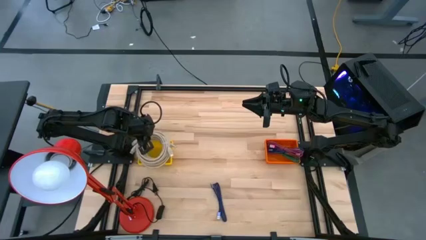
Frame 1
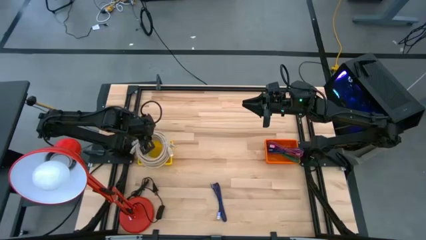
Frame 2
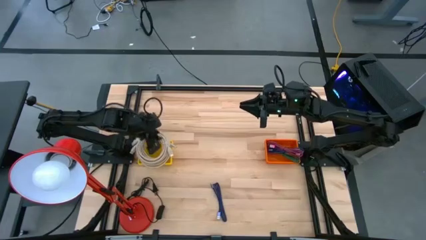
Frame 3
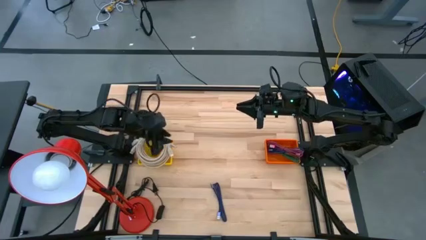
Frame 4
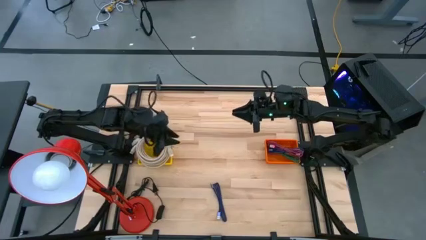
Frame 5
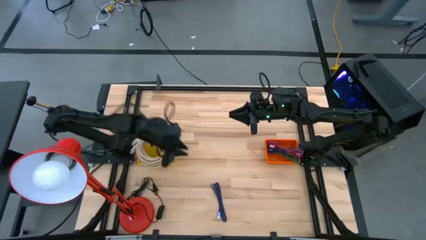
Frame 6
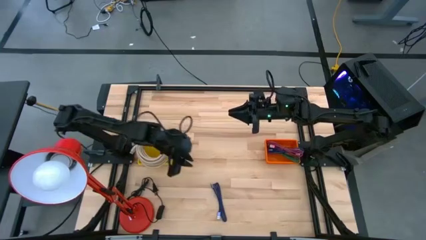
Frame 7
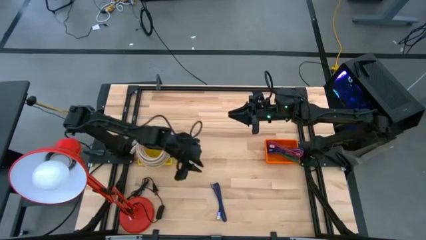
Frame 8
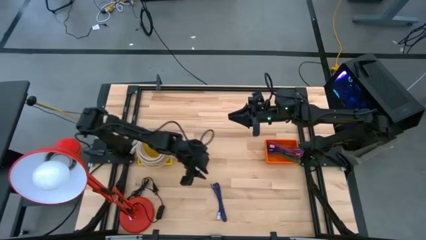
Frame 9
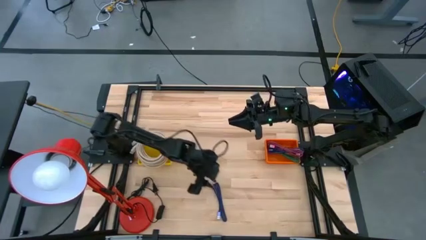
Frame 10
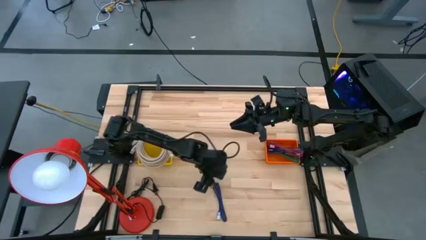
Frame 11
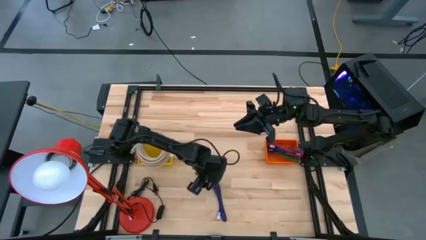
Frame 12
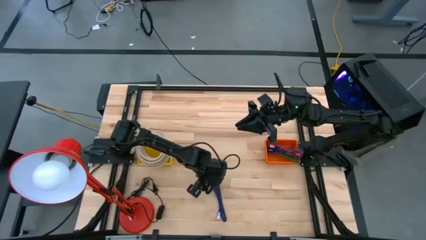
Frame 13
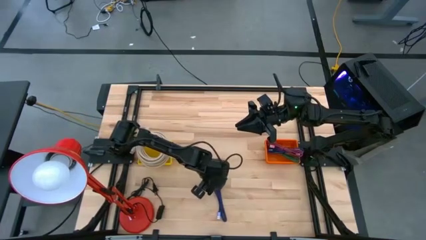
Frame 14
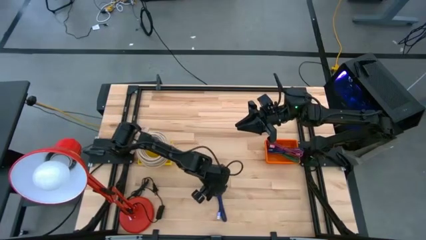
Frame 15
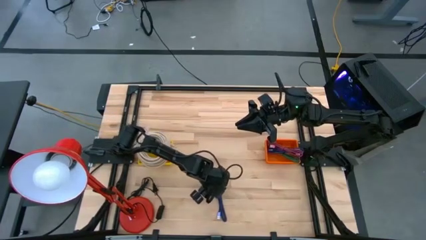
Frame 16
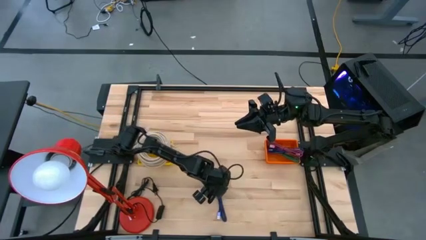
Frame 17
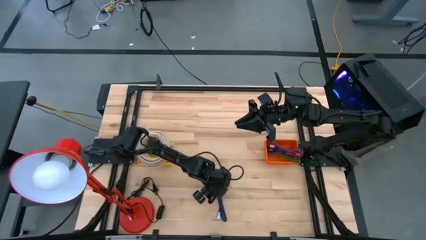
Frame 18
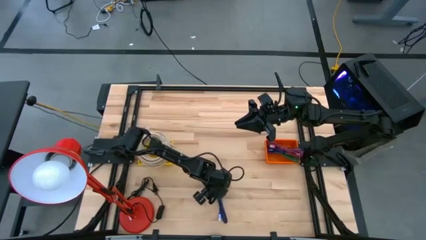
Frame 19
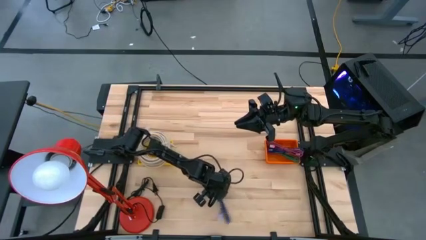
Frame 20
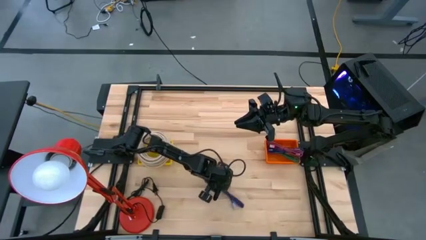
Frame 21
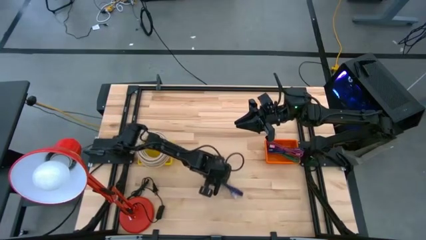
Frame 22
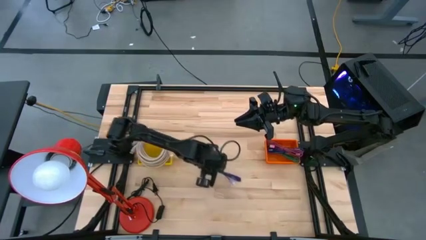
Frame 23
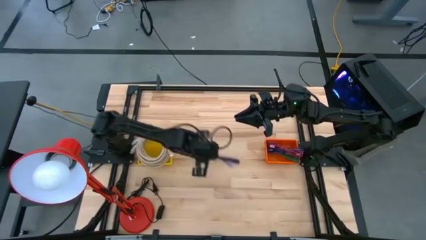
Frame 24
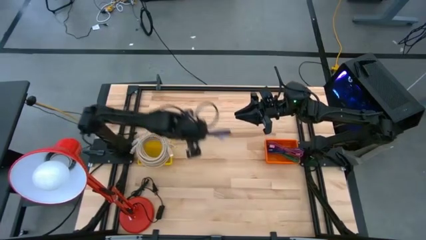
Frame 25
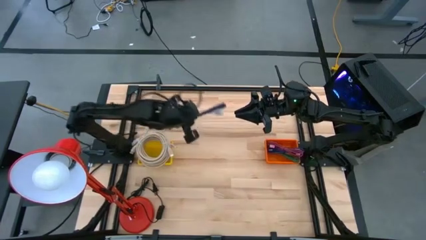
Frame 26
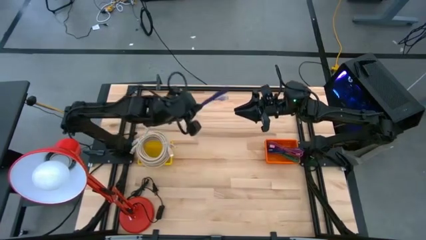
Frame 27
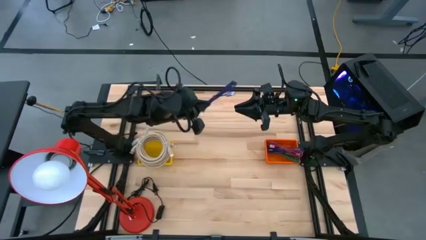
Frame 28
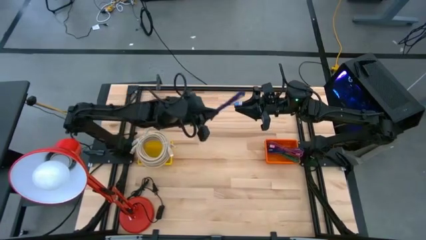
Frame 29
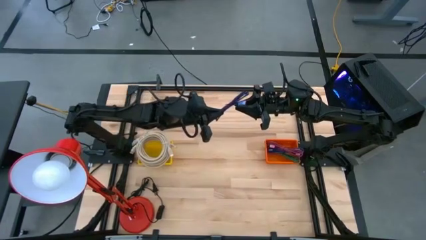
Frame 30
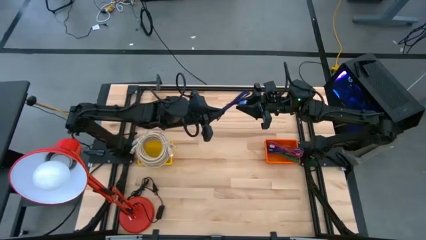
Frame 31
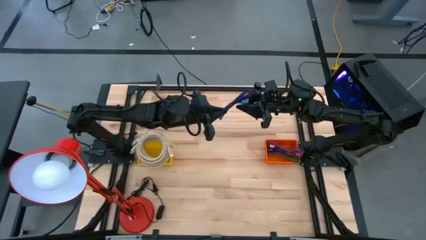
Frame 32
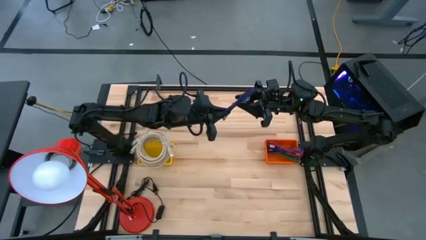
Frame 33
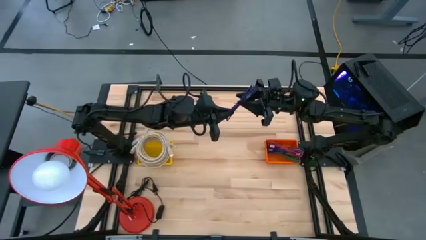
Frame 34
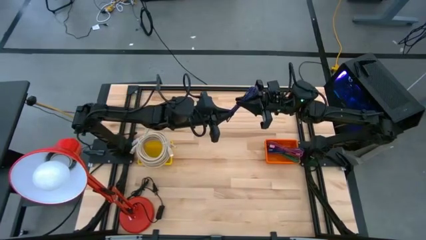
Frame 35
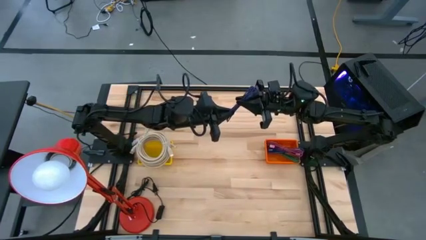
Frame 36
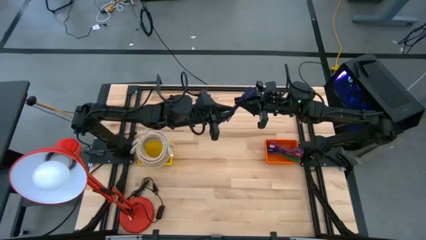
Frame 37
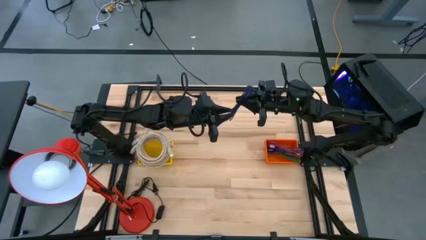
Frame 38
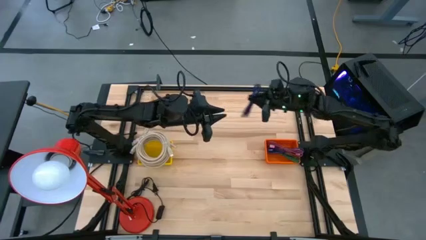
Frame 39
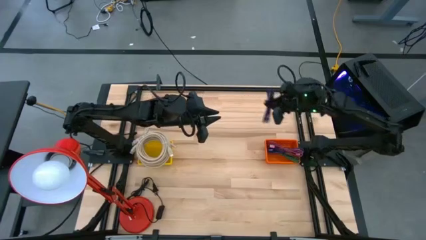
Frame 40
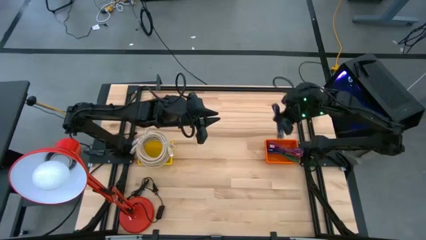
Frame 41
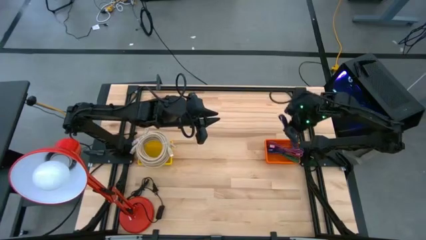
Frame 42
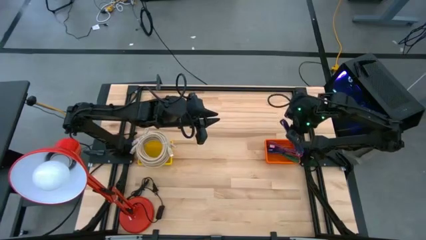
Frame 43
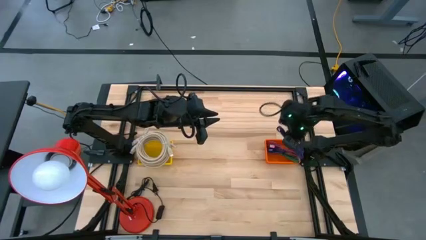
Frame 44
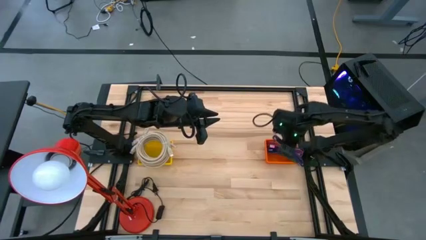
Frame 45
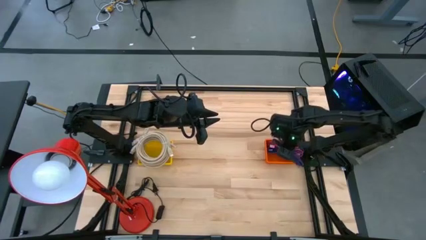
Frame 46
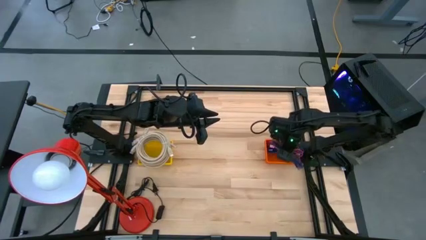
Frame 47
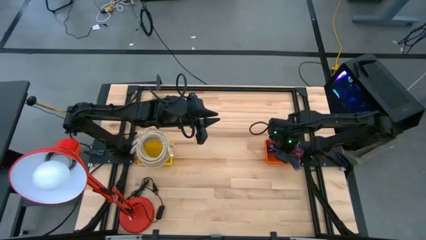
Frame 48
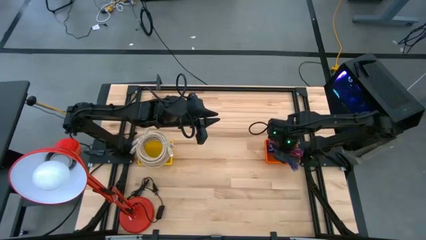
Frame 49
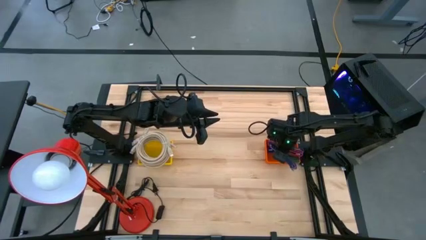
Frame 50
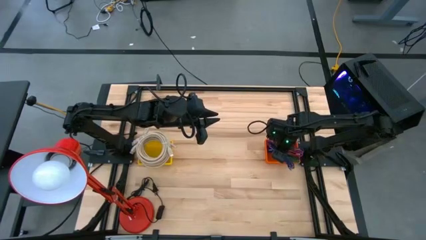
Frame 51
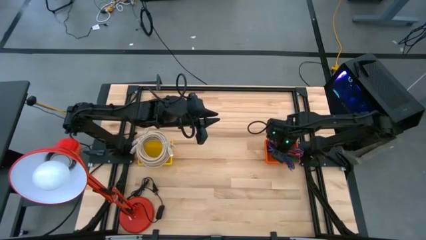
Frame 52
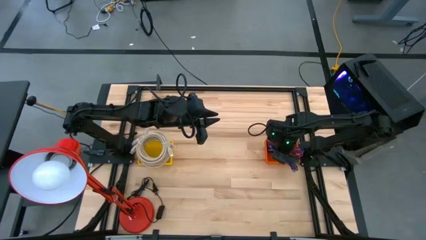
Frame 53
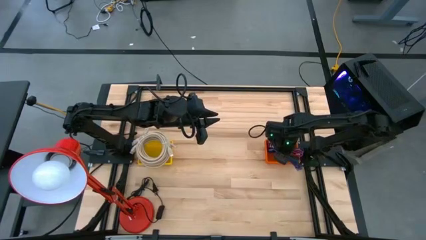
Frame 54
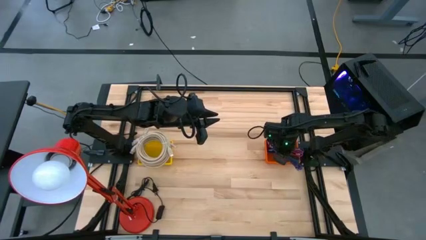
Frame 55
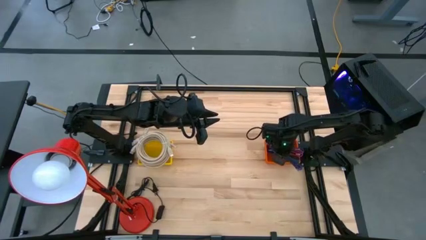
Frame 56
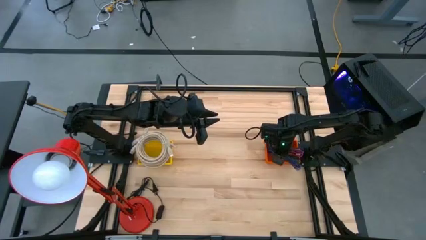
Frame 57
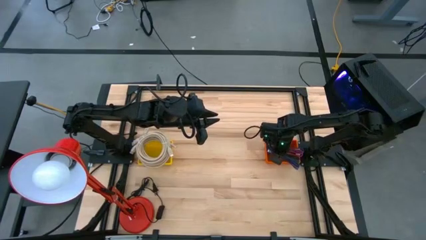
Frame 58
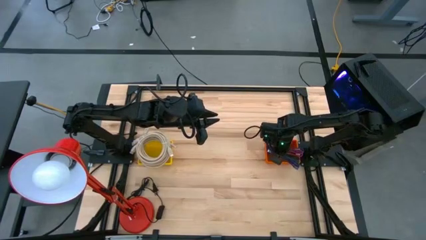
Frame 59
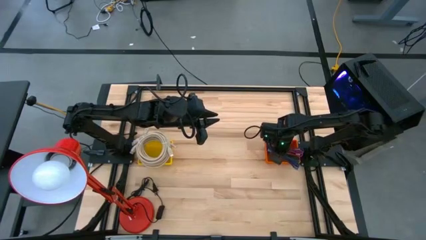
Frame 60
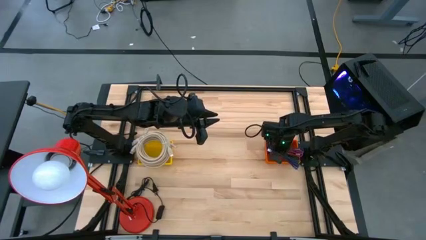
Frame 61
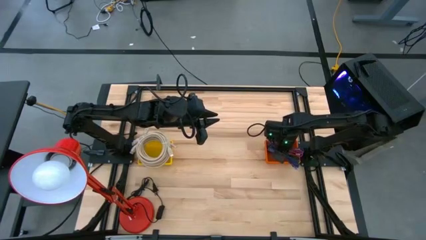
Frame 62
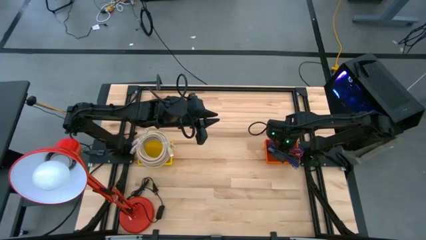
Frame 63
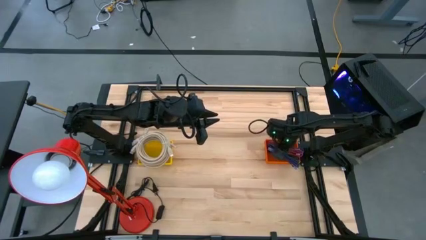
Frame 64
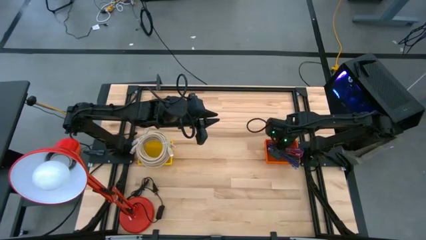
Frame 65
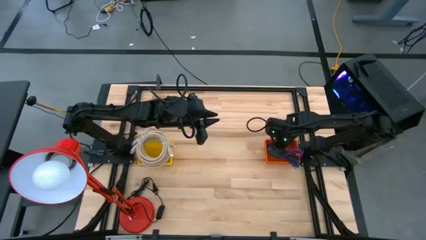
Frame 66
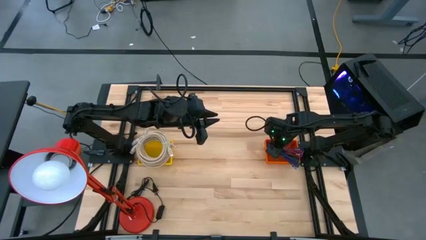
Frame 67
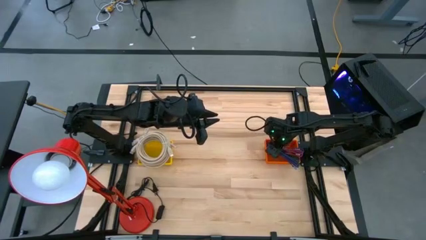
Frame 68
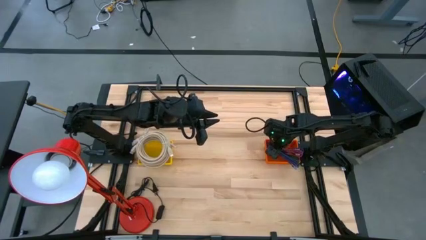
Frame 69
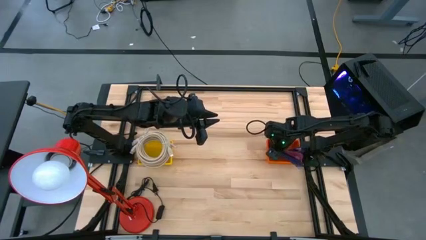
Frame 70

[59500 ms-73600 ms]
Task: Pick & Place USB Port
Put the black and blue charger cable into the orange bin
